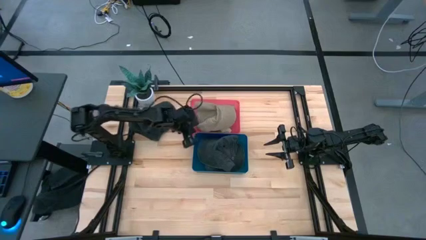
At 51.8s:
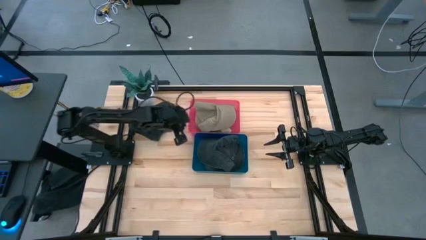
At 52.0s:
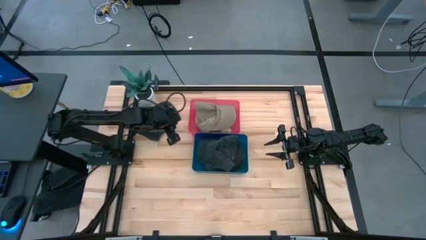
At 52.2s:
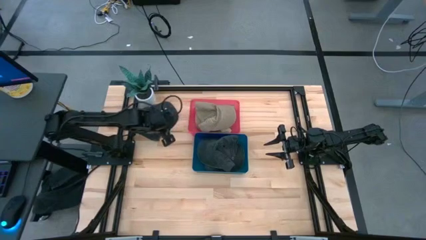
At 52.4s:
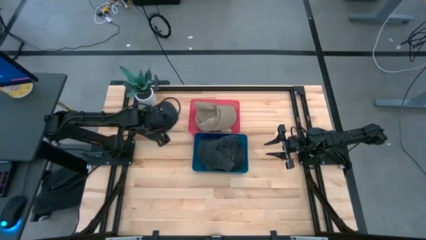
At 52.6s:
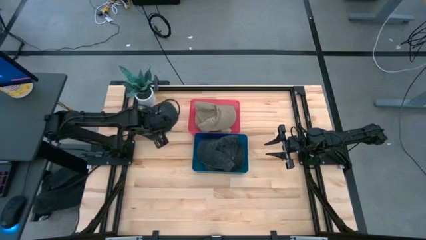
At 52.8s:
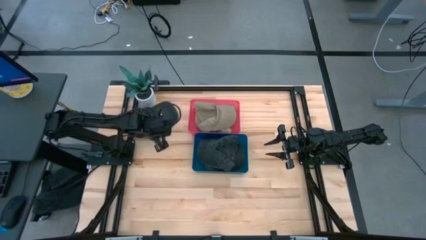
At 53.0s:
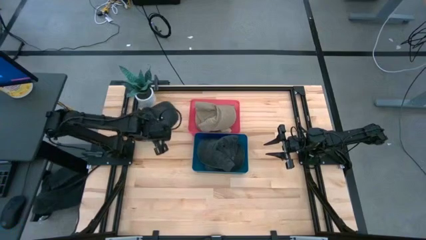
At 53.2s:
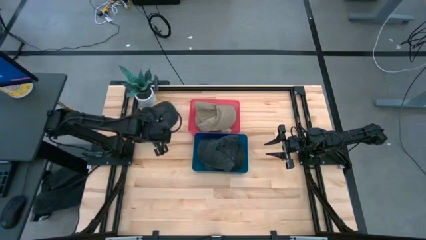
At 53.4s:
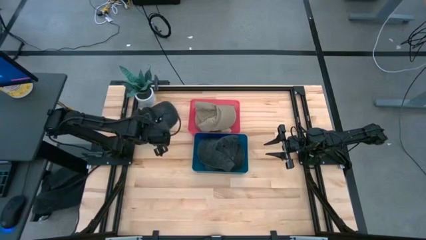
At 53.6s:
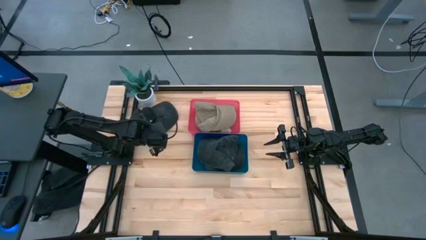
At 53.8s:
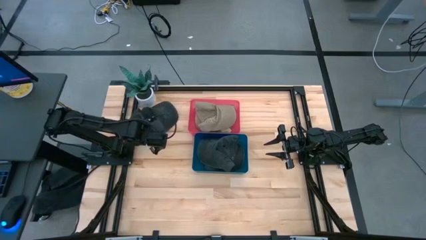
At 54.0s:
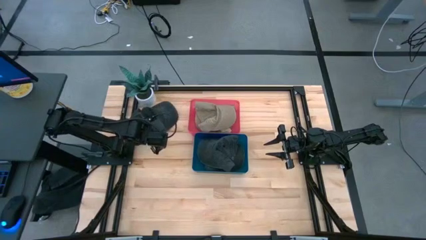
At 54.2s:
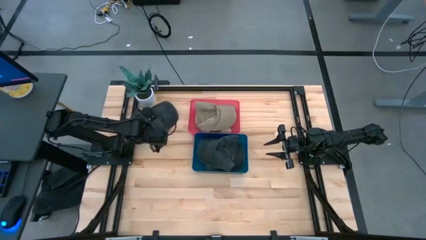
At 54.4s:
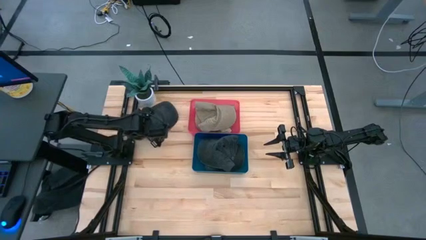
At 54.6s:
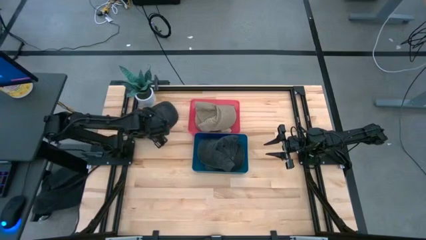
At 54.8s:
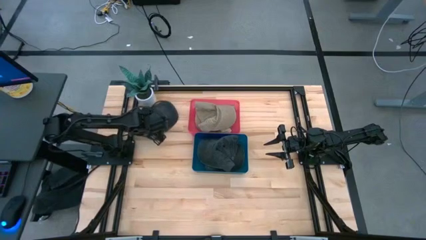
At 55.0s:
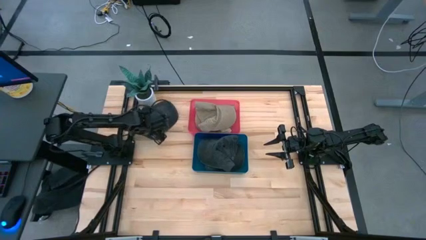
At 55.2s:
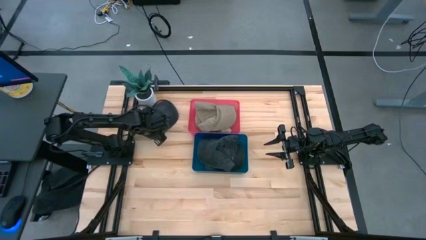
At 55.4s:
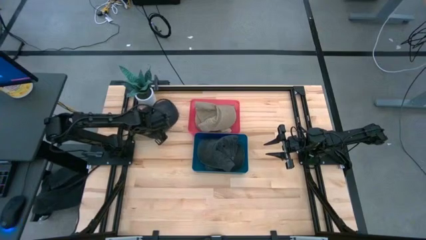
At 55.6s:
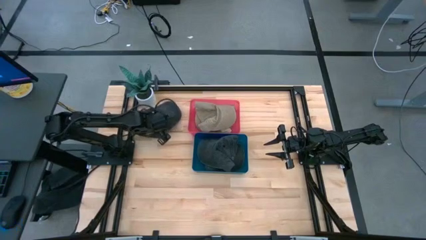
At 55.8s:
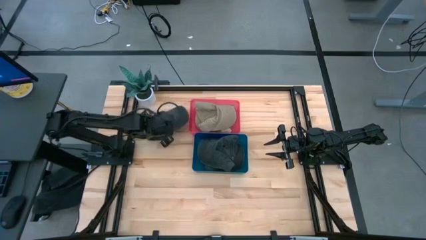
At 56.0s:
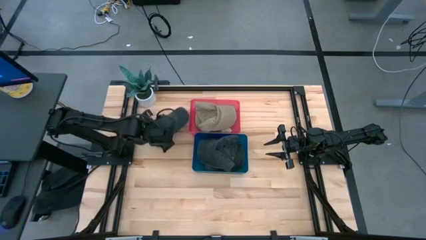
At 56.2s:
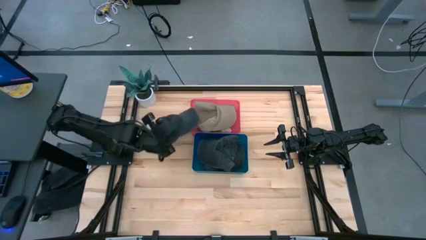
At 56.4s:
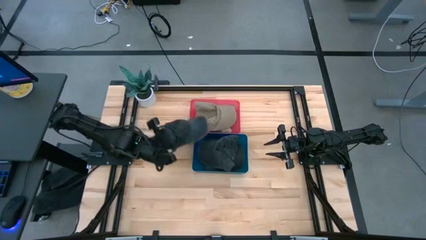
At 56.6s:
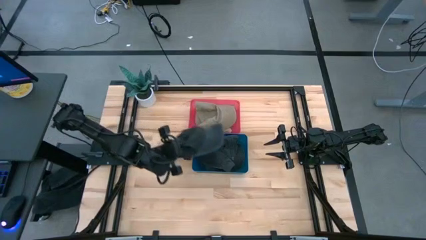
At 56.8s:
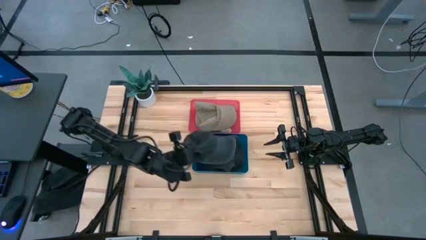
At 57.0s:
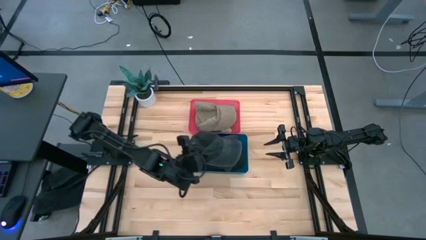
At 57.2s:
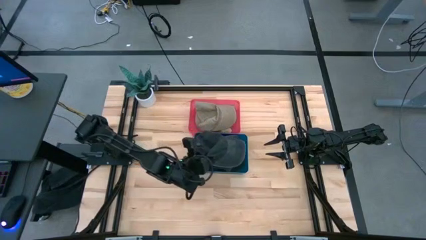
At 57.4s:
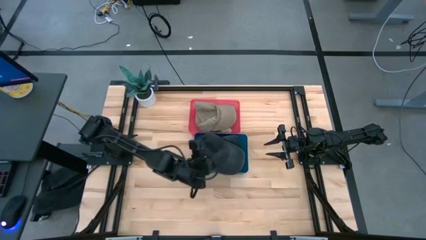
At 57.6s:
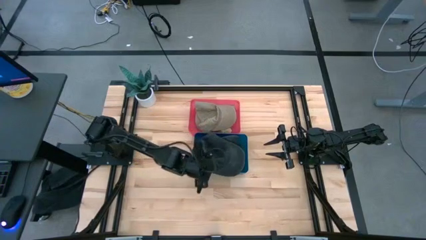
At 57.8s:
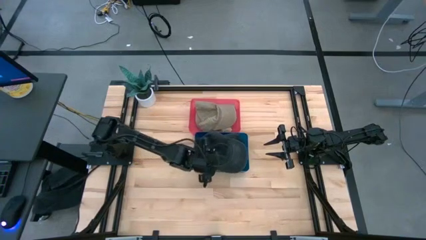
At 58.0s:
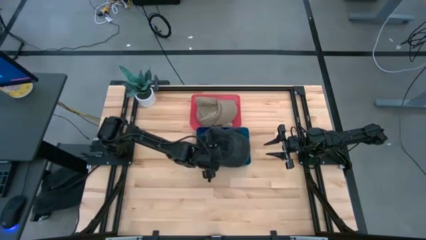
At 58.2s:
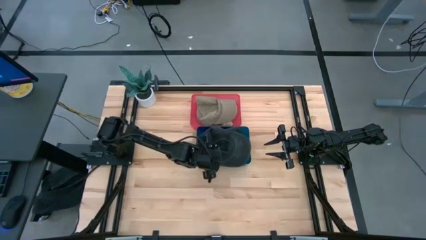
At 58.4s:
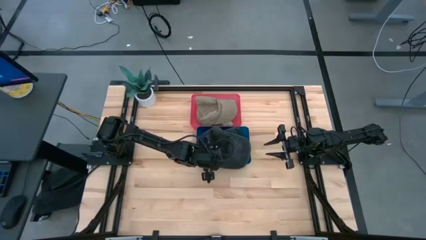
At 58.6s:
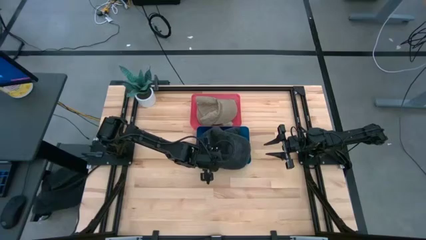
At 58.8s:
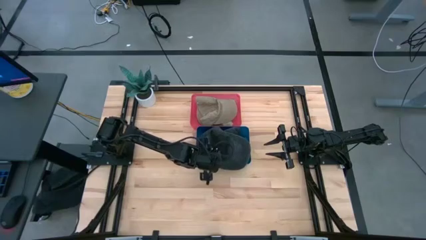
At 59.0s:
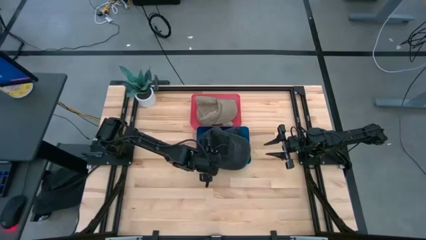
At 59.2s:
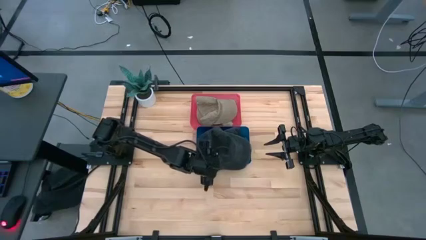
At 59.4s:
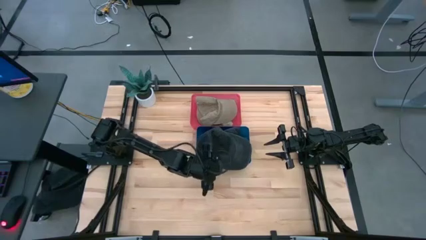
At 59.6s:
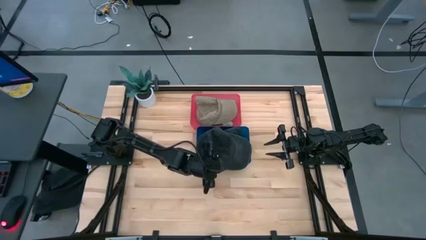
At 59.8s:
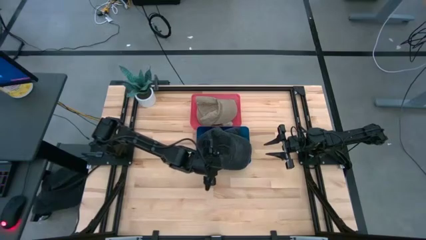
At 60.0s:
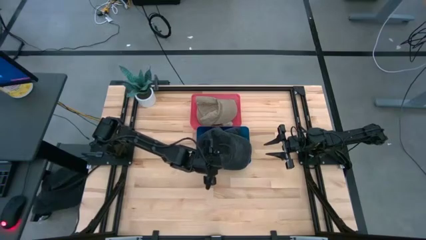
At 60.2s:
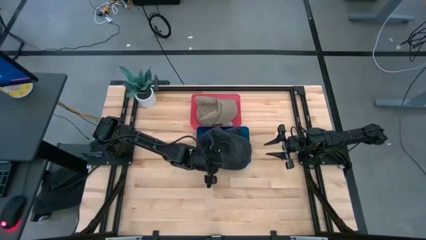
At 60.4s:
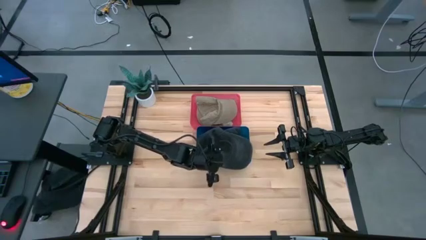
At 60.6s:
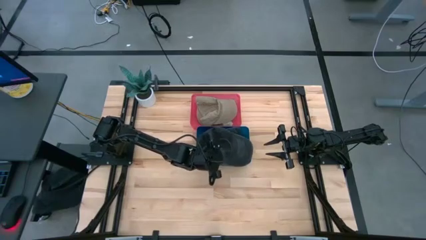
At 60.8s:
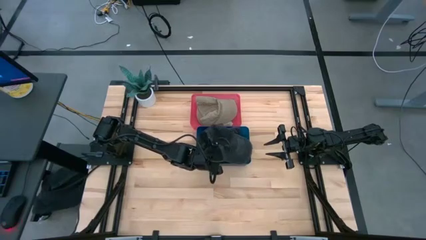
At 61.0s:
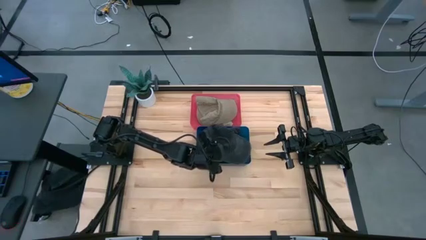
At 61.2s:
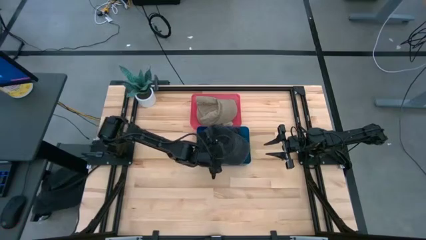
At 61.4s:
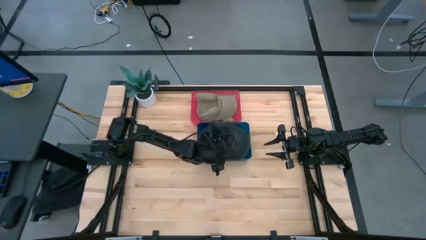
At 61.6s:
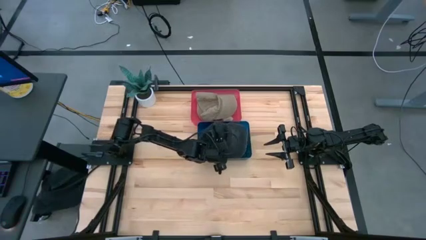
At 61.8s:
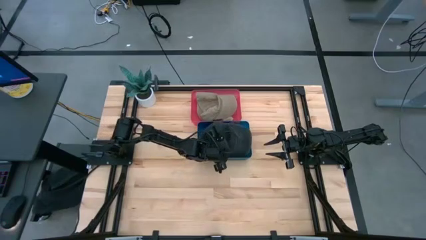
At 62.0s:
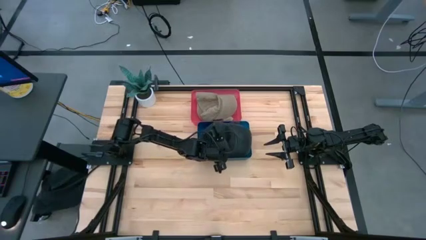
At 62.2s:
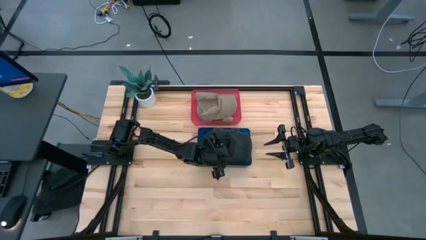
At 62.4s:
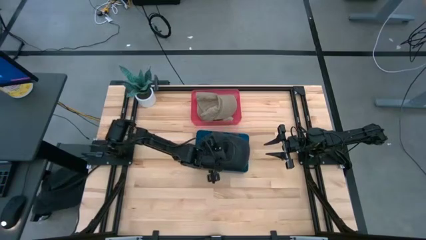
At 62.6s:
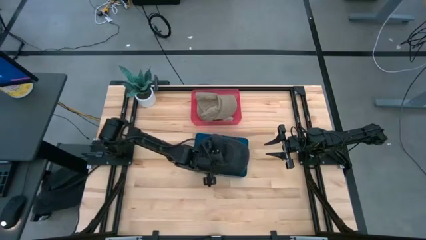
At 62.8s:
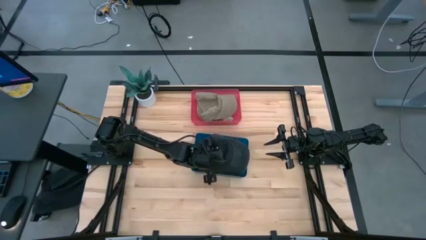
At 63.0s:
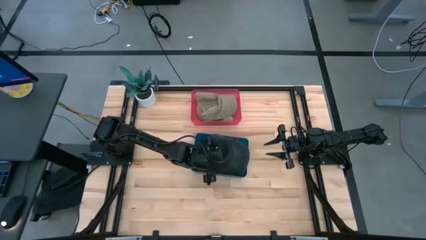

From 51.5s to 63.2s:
Task: Pick & Place hat
Put the black cap into the blue bin

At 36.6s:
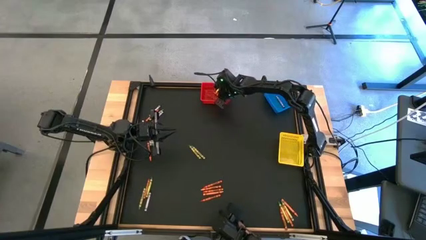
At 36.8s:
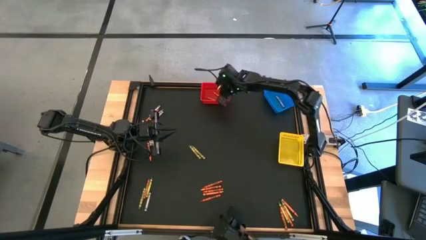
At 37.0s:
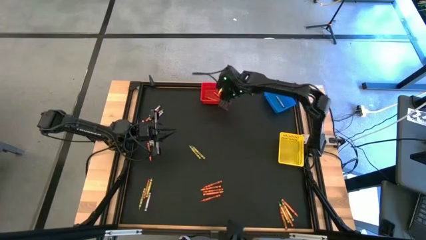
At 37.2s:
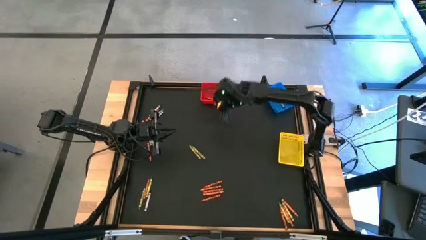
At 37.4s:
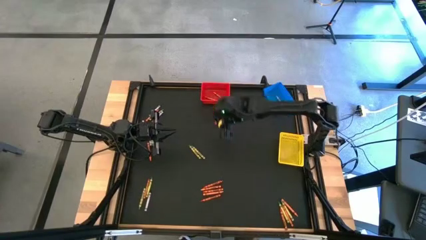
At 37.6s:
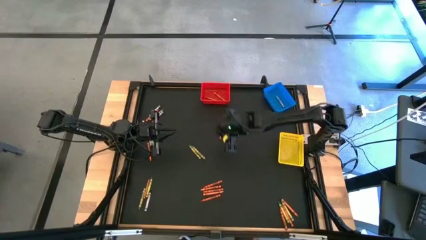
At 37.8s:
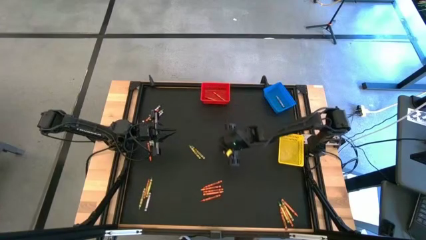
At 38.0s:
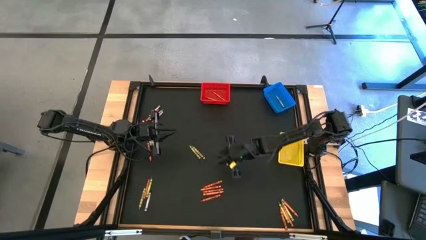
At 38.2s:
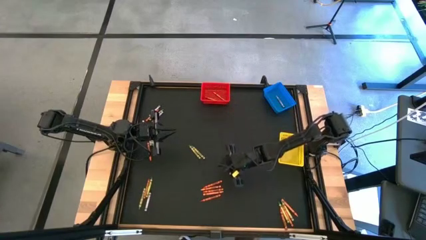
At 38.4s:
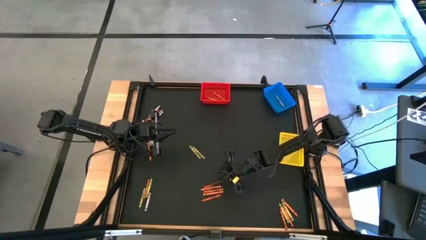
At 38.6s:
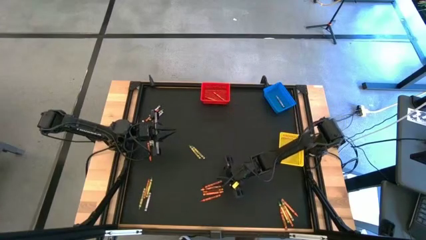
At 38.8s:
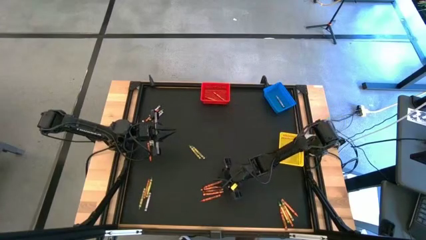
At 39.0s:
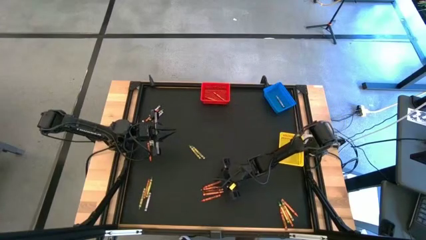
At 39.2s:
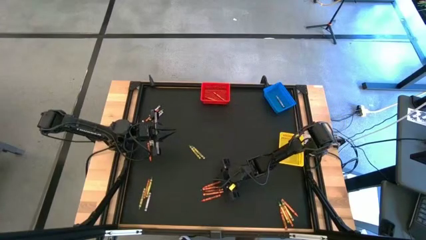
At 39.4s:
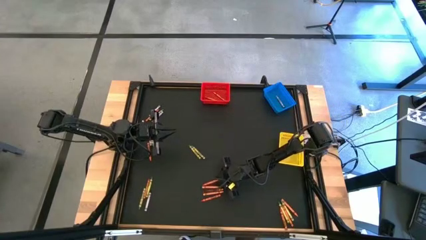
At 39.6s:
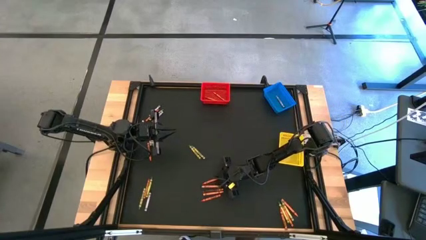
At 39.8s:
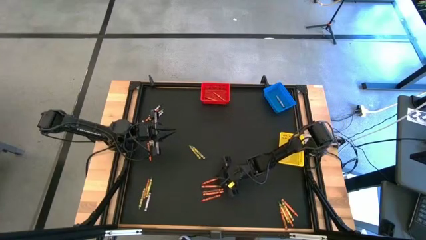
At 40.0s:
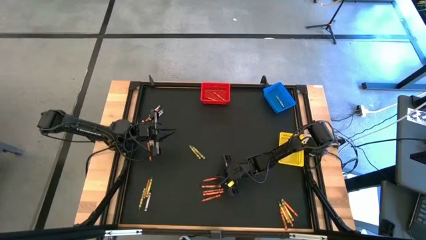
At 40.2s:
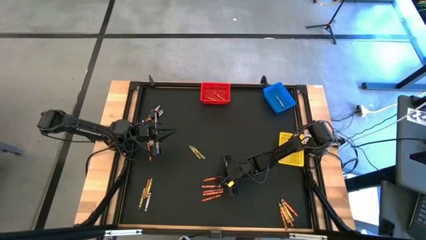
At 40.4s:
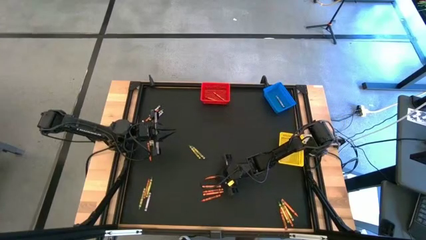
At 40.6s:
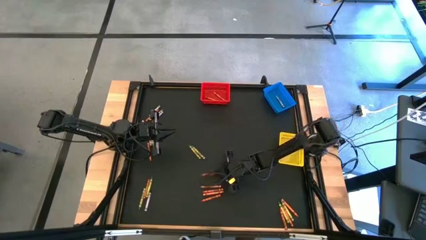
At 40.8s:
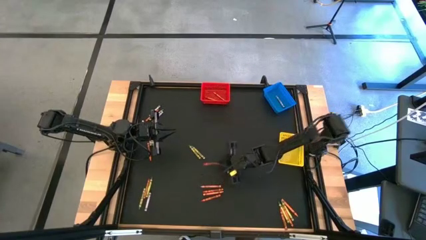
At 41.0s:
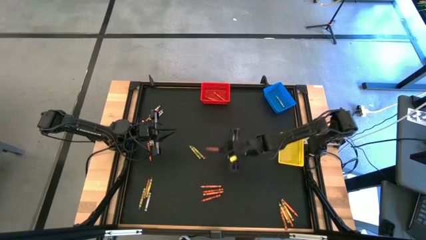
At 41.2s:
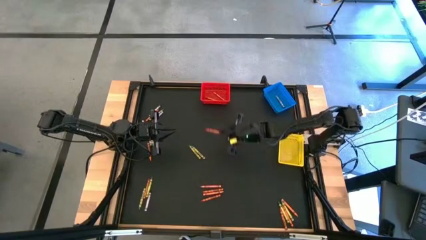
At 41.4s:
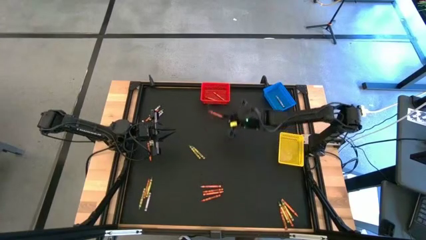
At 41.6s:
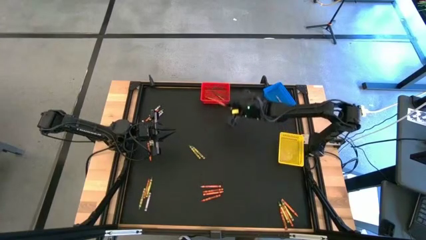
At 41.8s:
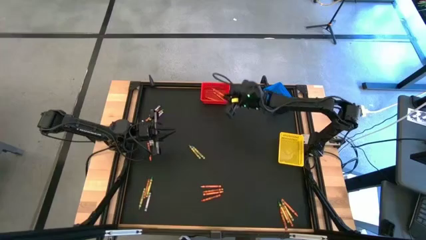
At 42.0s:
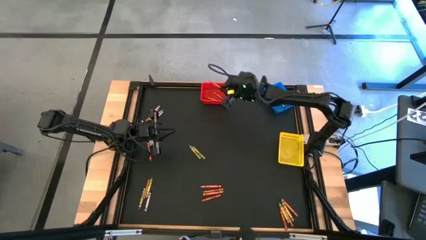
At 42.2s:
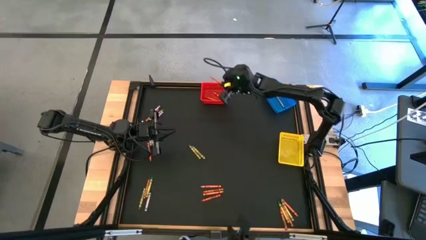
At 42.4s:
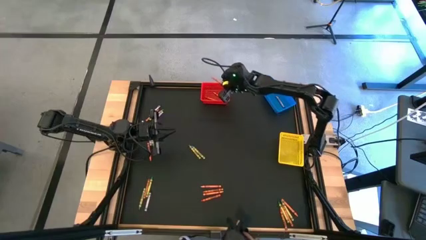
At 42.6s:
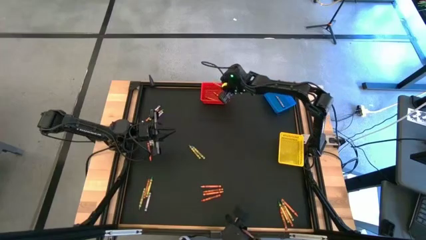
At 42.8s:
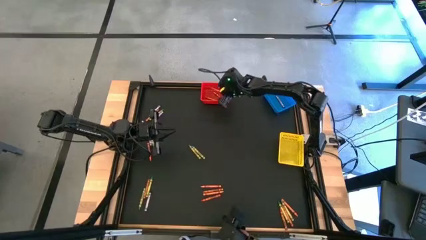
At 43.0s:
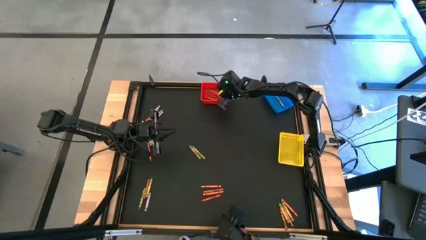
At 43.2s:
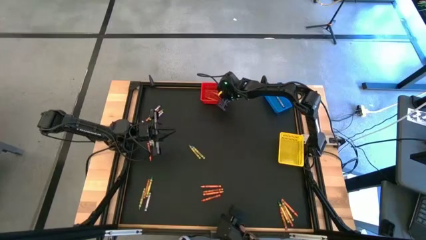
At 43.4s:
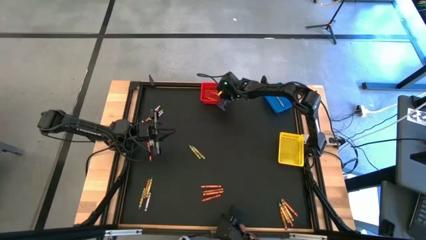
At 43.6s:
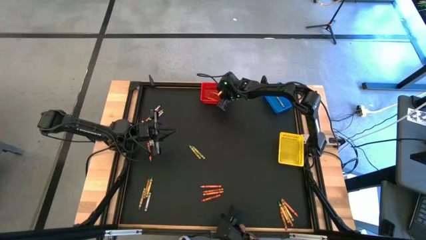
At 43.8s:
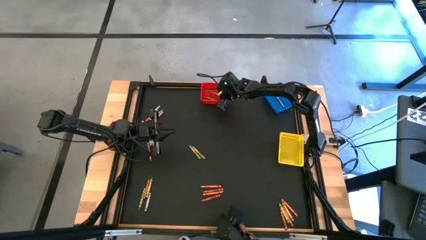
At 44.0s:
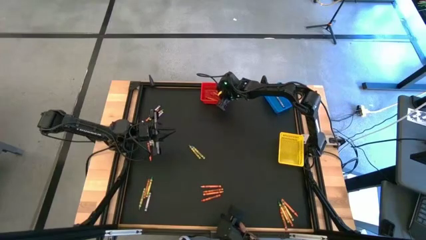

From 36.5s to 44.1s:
Task: Sort crayons
Put the orange crayon into the red bin
